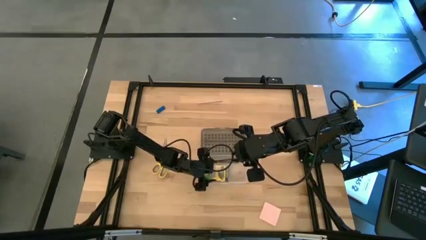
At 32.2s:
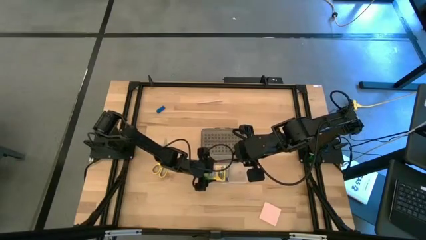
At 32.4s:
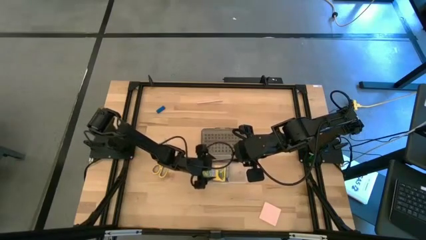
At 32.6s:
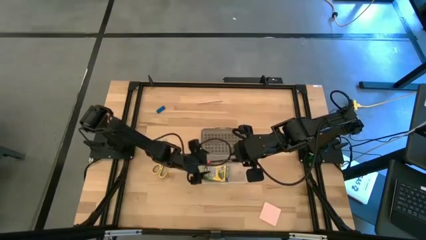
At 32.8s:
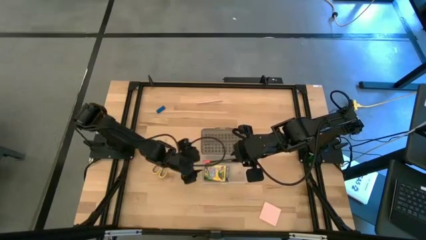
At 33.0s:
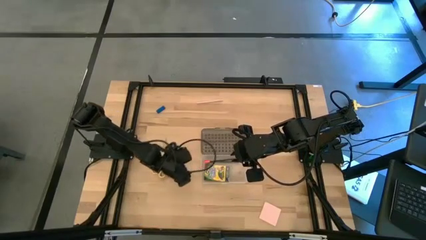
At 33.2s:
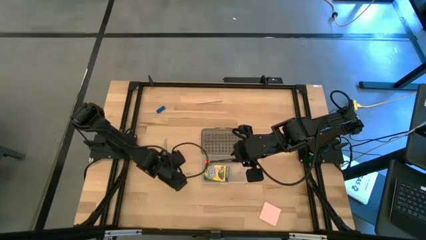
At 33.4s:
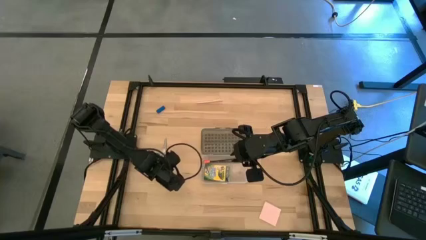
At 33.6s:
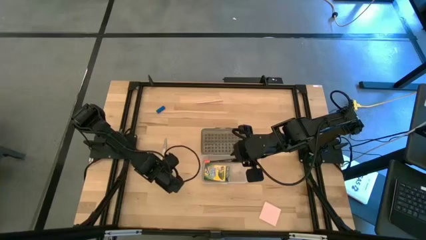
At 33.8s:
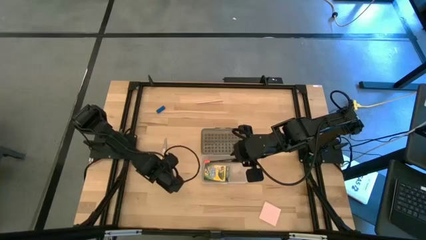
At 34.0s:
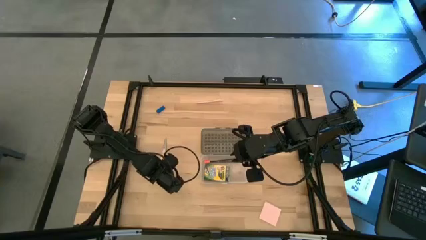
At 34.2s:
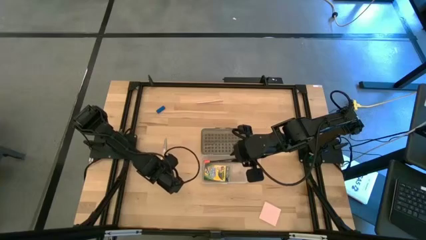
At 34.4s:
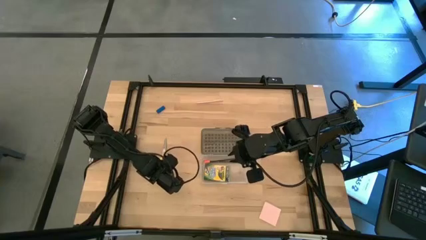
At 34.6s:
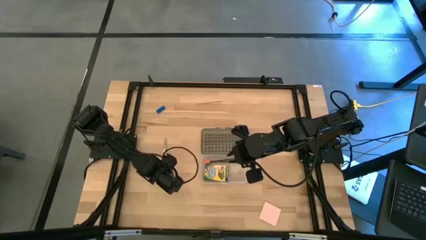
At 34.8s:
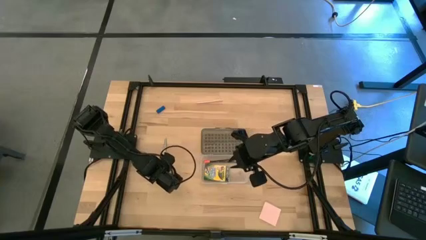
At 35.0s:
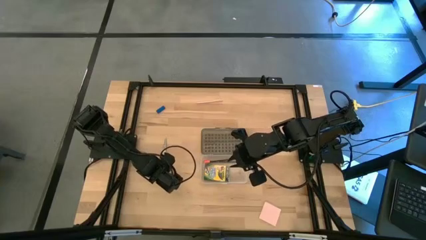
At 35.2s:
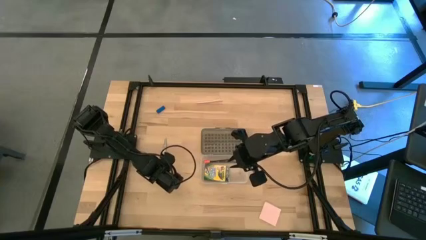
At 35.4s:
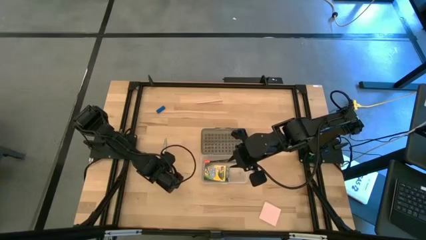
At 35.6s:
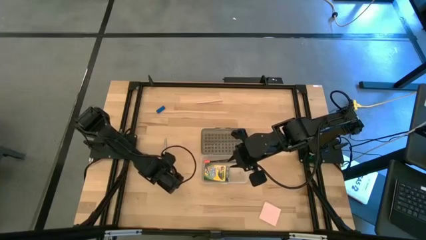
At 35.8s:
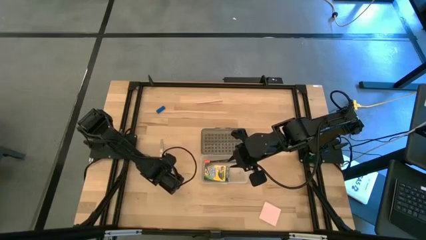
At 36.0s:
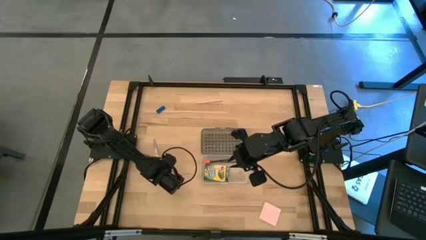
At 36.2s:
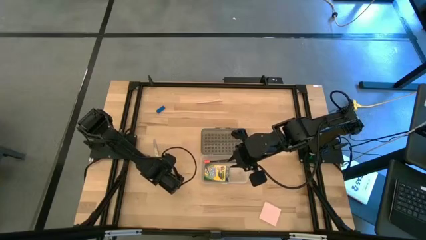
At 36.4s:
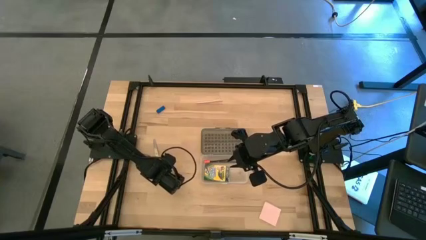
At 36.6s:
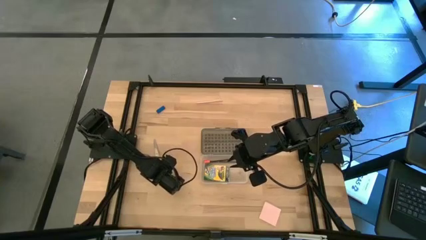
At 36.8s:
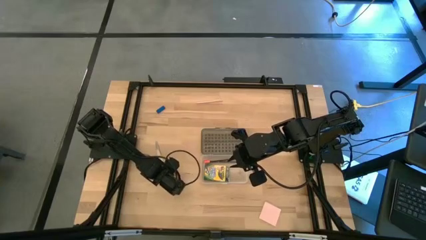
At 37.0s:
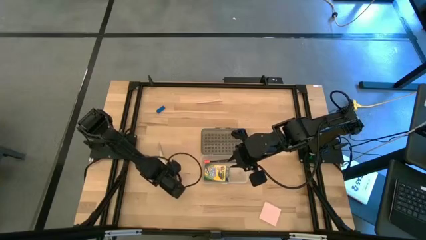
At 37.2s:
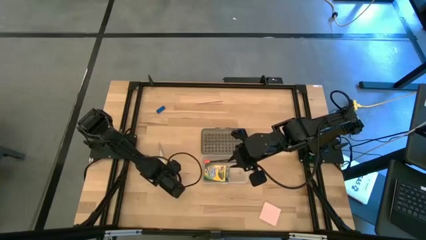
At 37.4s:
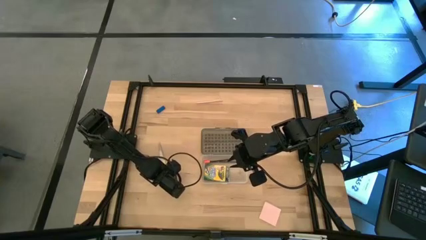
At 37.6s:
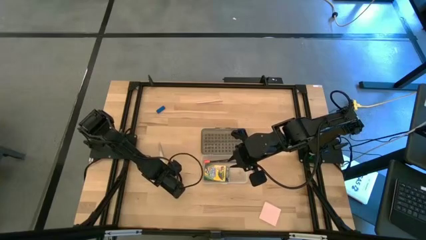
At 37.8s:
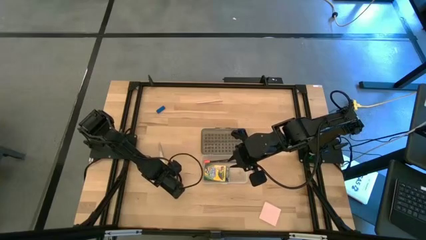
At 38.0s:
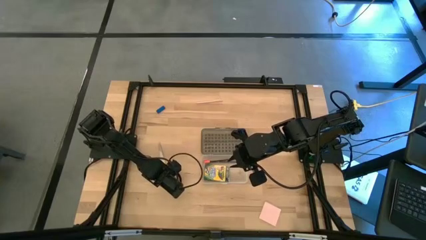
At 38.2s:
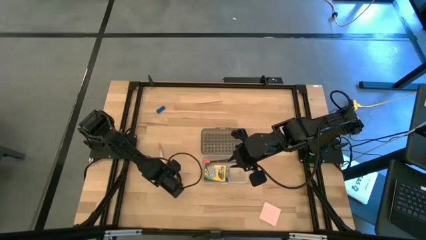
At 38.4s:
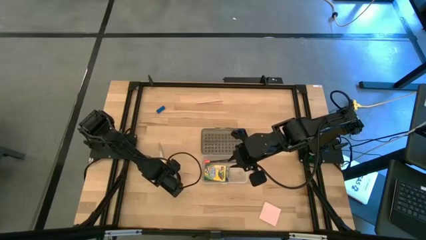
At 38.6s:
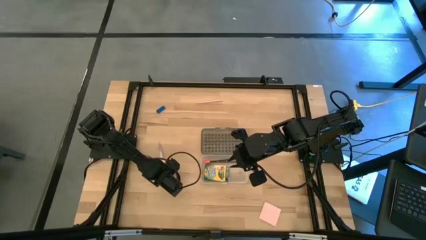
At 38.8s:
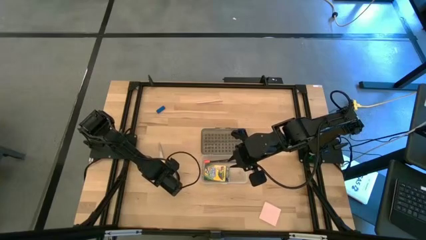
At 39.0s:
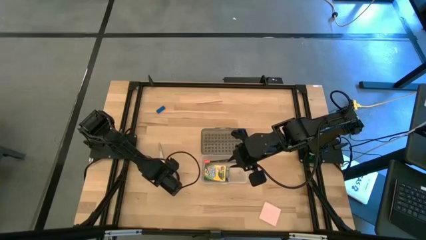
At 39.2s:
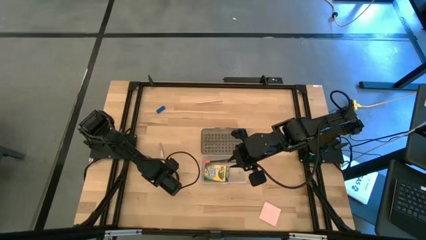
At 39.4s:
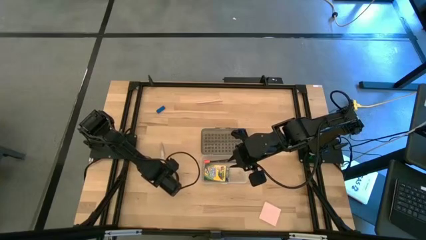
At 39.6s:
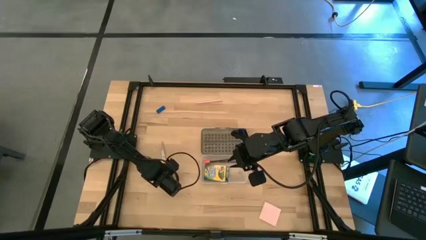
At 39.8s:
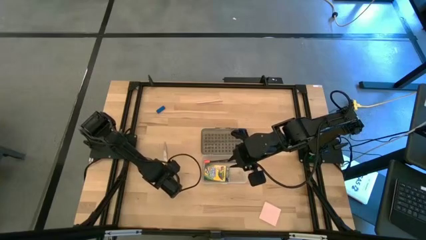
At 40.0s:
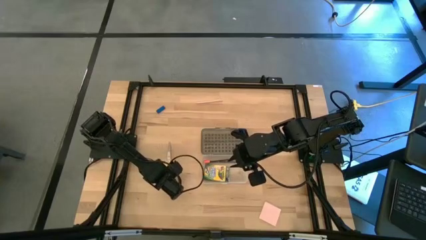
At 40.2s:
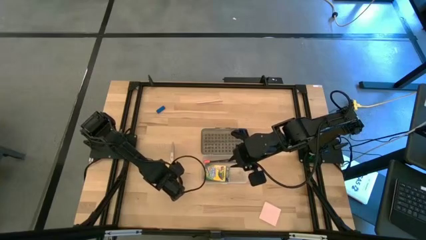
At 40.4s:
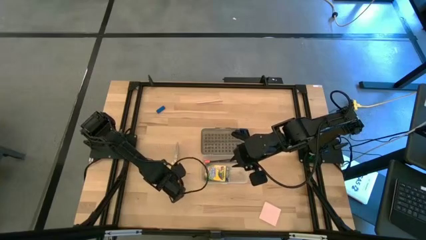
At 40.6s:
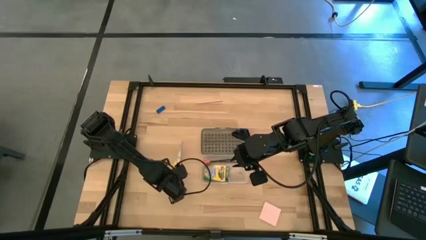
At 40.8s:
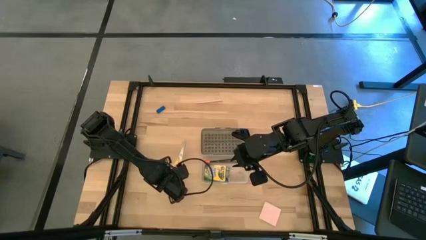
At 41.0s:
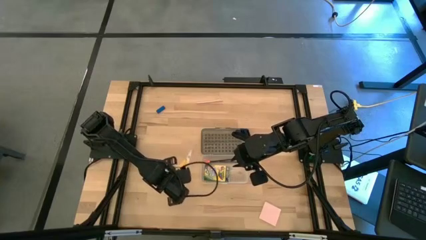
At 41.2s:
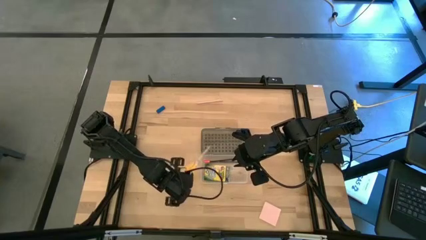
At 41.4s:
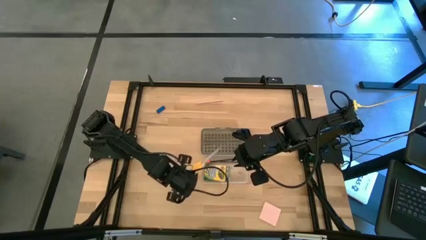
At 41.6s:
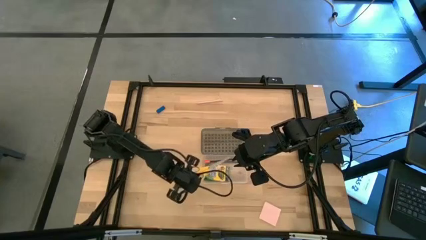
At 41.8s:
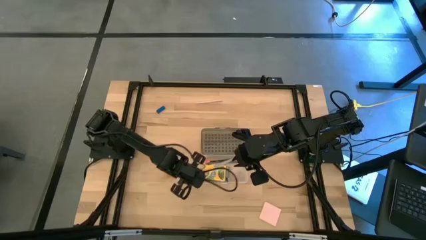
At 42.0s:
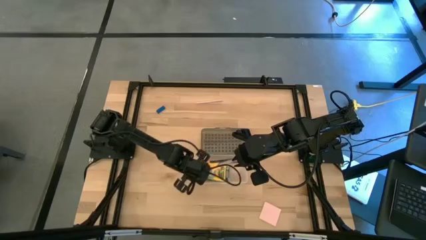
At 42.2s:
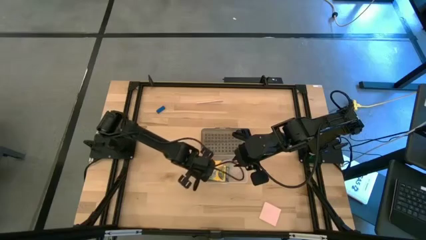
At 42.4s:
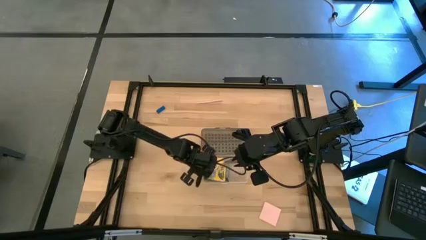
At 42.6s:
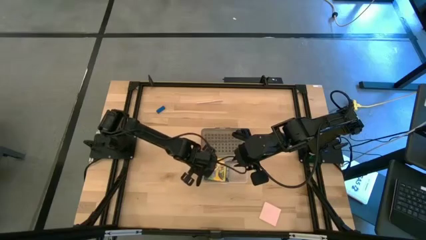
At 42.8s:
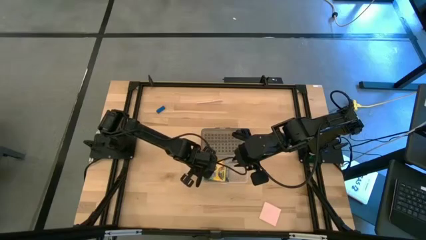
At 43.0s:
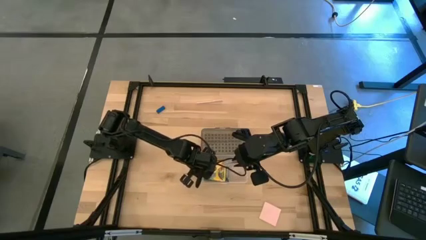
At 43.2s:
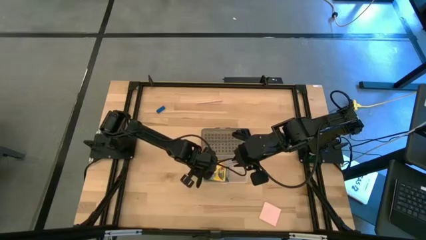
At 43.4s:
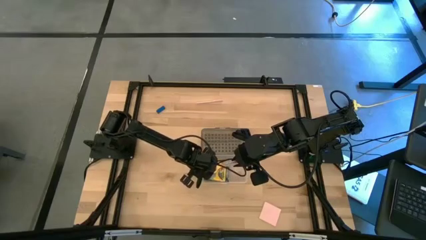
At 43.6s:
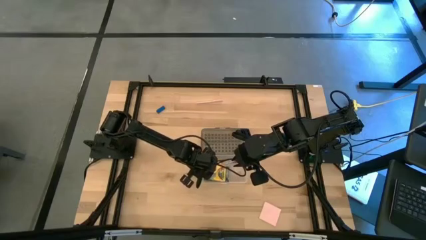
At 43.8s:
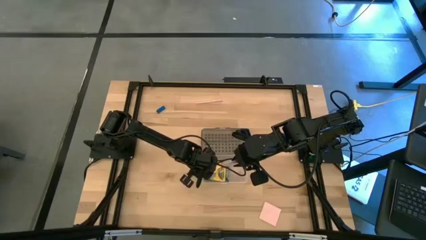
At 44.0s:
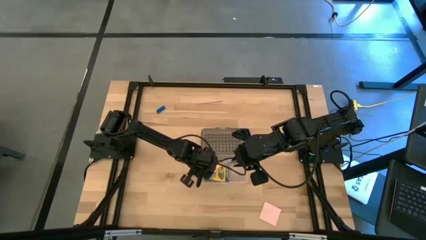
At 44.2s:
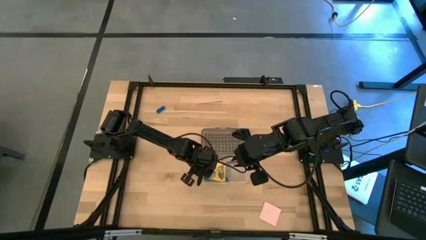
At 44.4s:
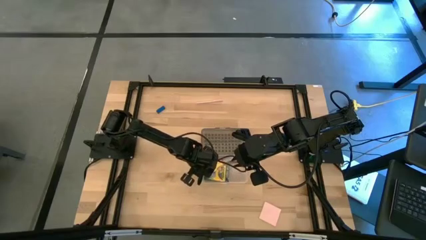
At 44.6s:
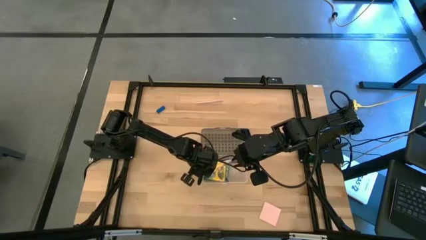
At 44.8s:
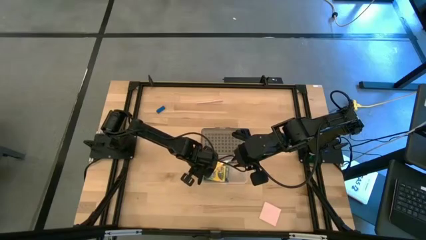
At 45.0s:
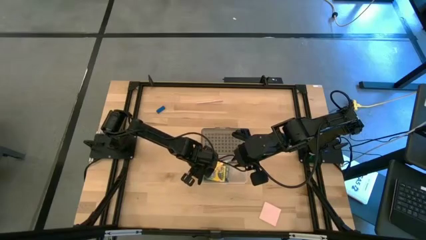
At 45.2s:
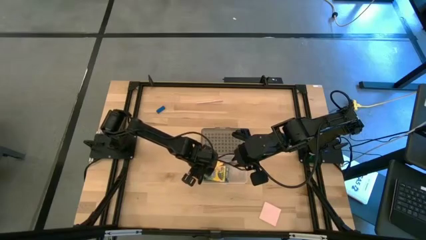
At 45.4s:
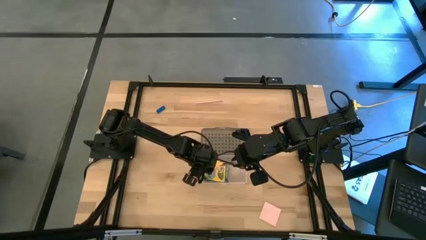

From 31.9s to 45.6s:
Task: Pack school essentials
Put the yellow scissors into the transparent supply box

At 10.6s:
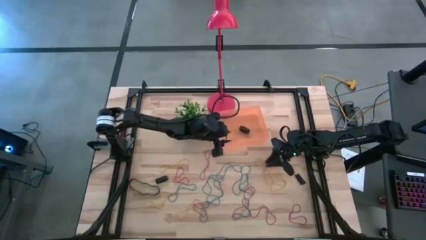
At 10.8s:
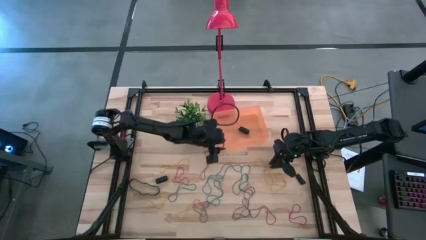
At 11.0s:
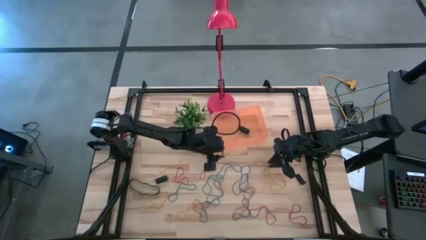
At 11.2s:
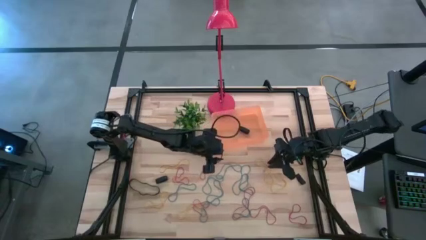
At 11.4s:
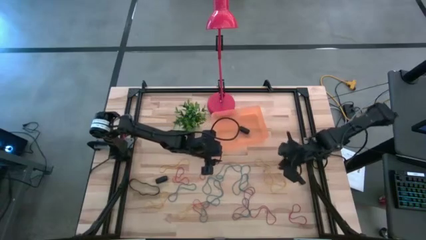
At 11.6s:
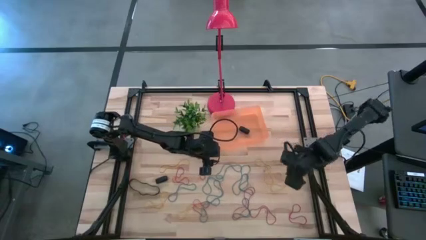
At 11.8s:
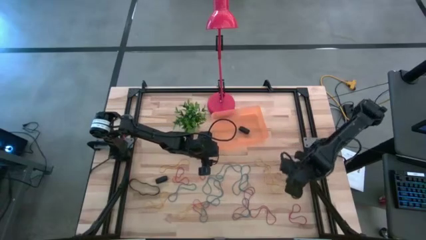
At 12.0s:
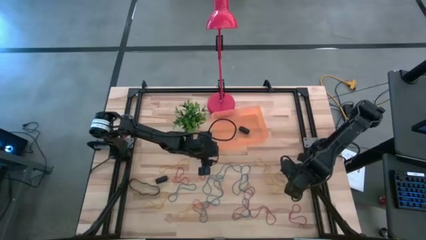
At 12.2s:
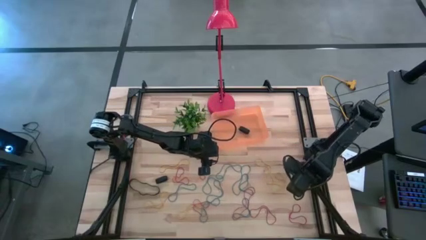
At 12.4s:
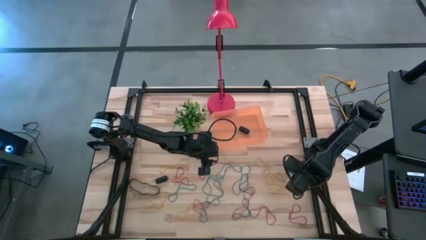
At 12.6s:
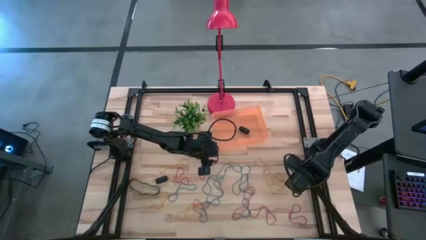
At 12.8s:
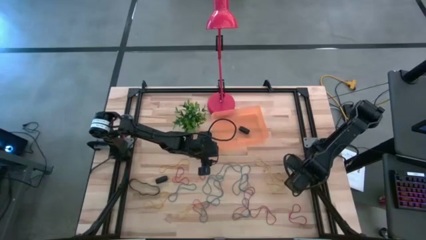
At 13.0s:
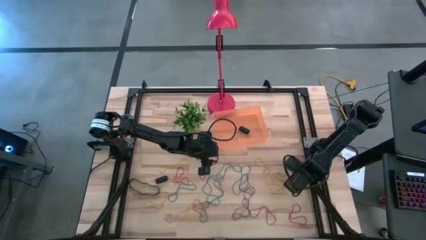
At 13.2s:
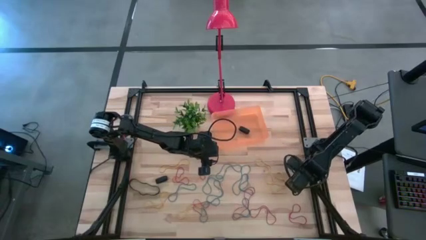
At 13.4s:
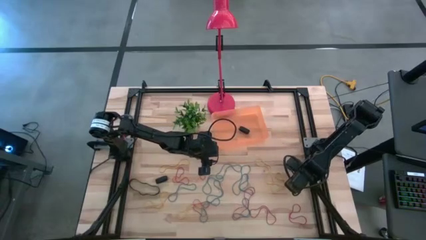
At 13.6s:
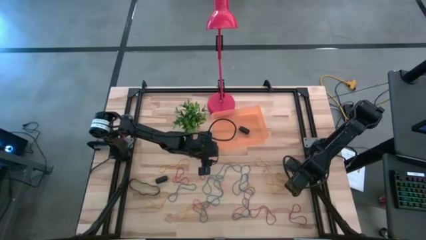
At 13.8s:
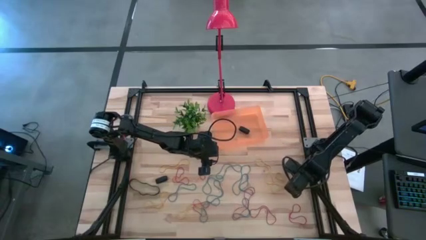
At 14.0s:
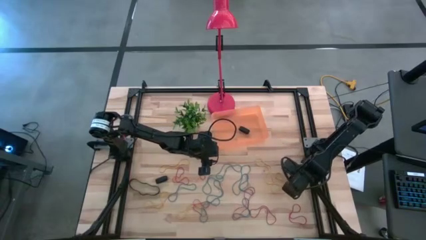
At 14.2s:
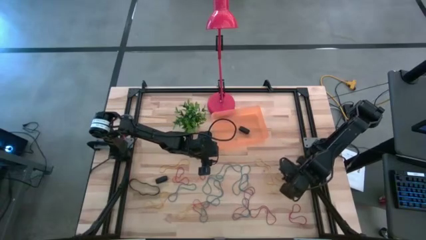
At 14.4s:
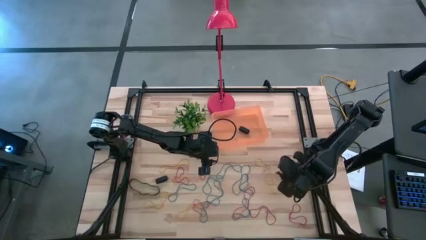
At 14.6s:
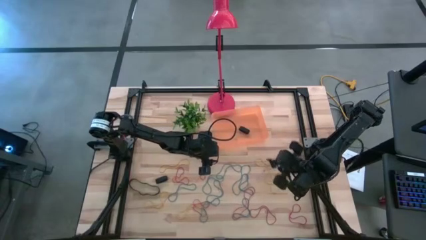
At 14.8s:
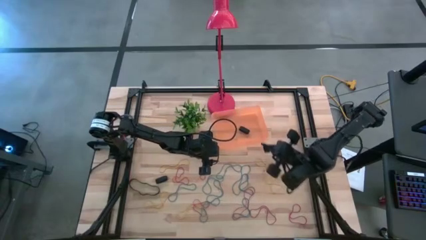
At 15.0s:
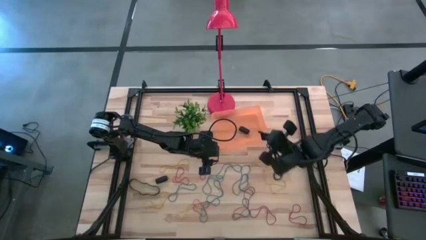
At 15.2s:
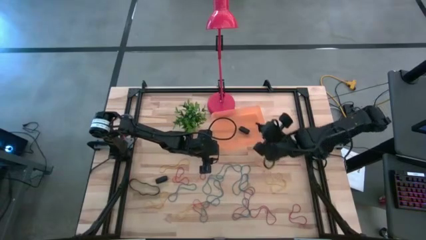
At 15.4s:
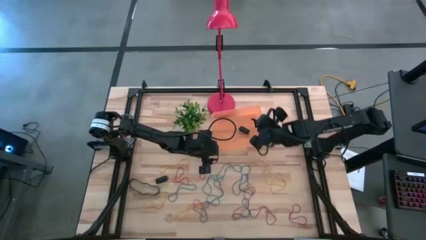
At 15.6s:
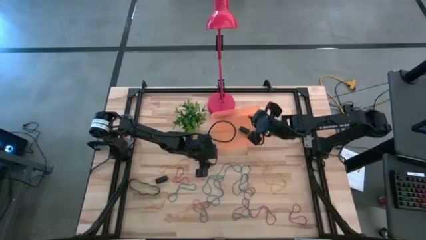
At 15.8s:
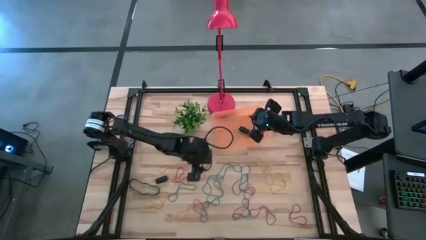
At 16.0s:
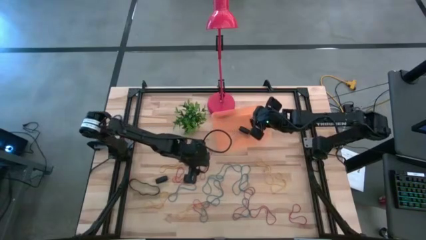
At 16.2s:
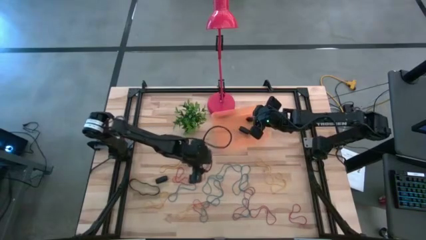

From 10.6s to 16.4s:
Task: Pick and place rubber bands into bin
Put the right black rubberband into the orange container
